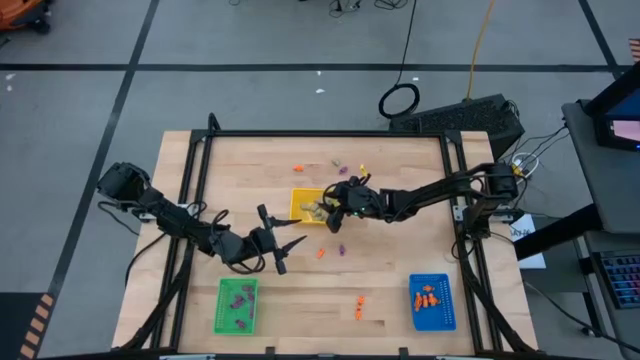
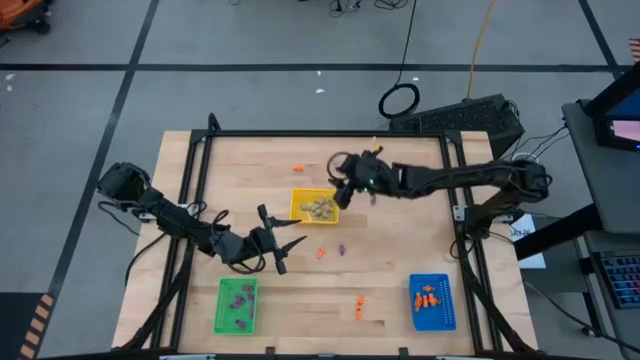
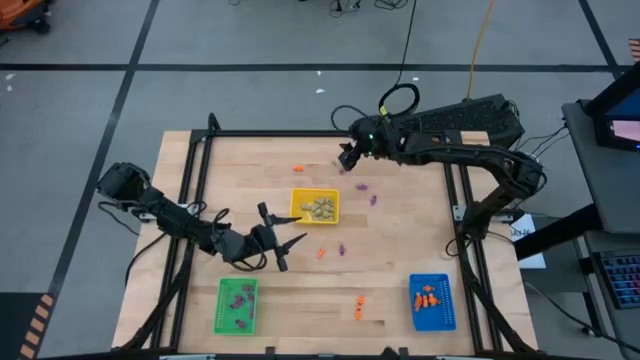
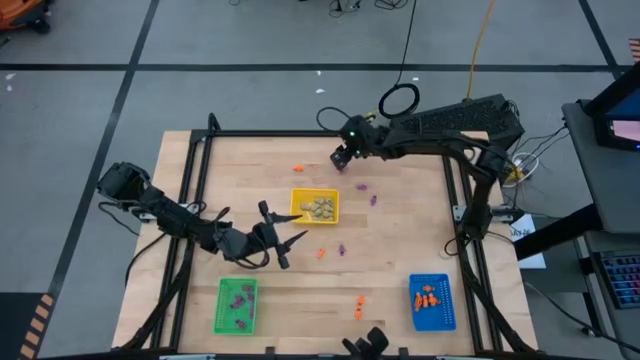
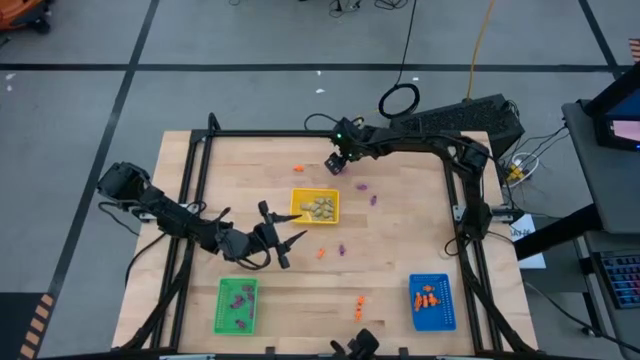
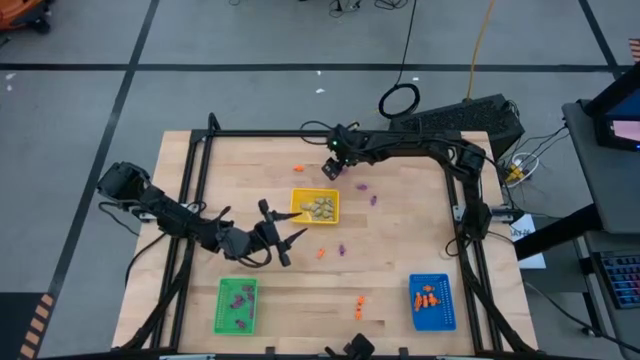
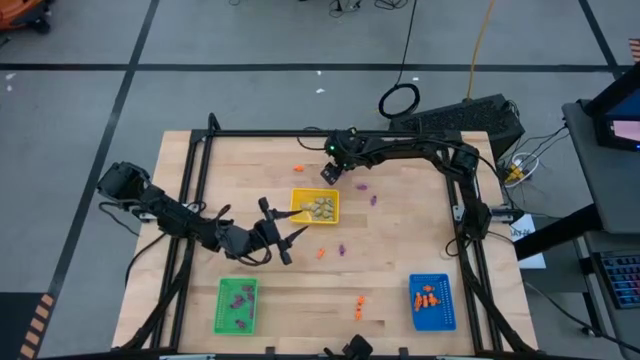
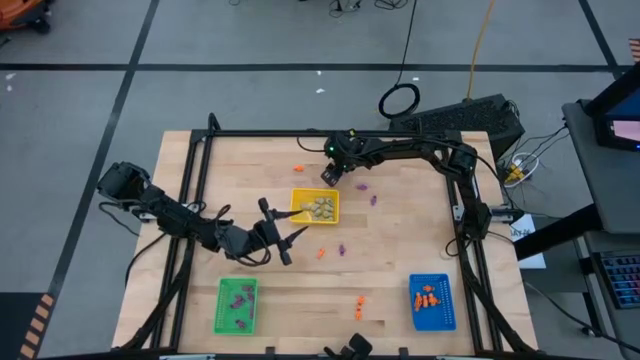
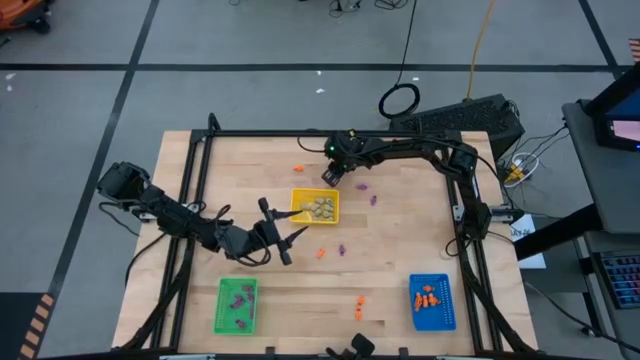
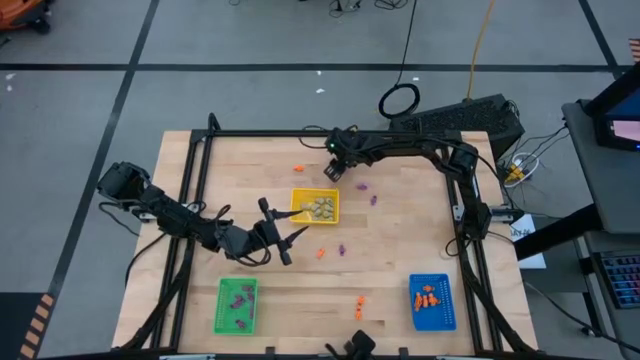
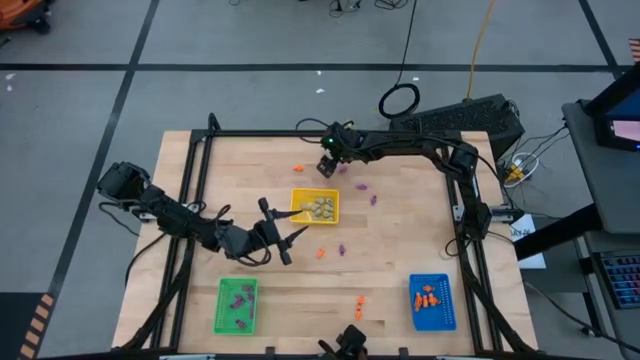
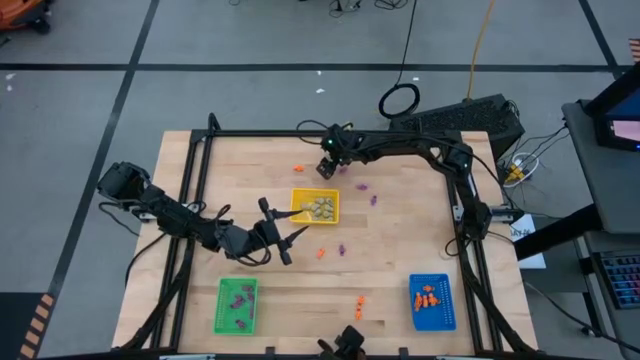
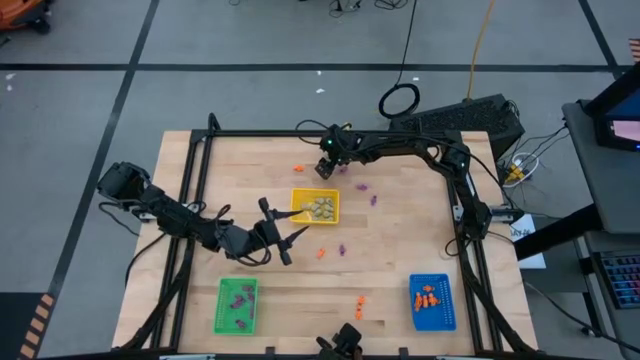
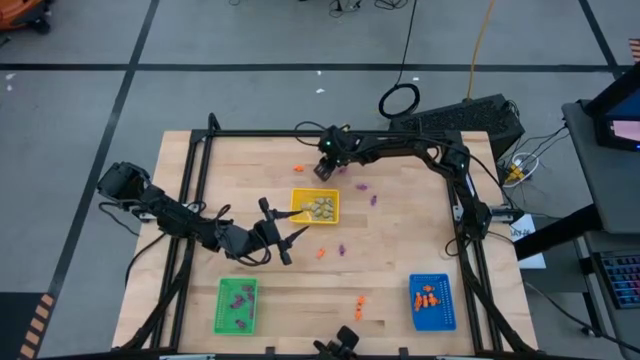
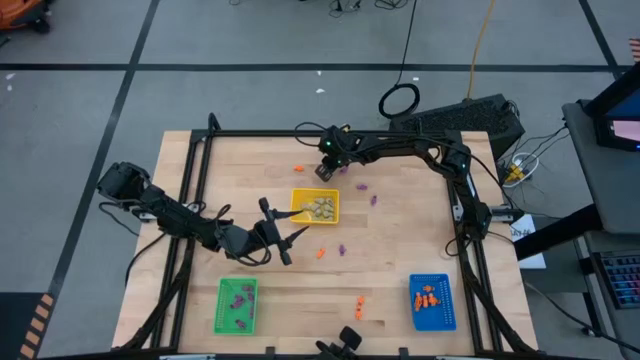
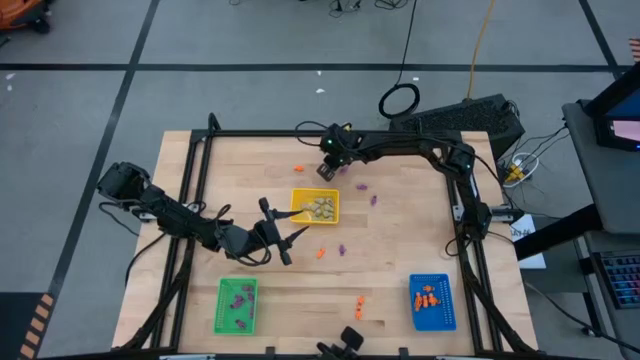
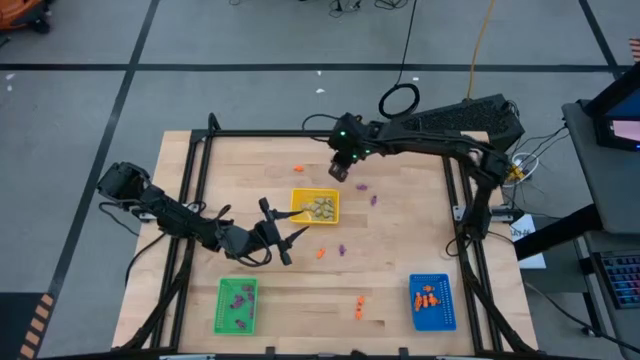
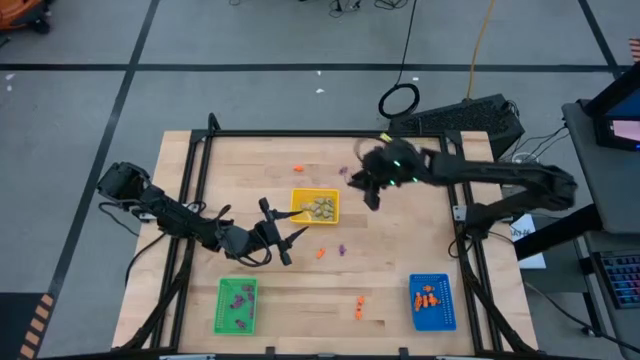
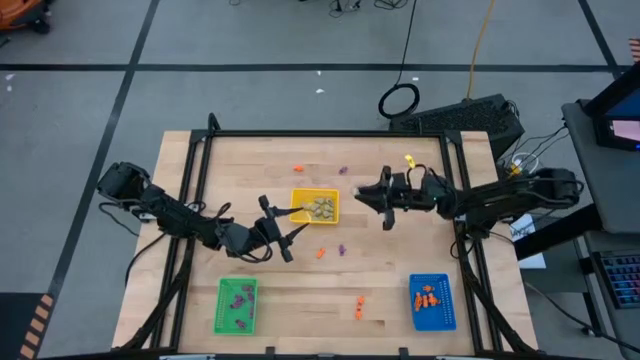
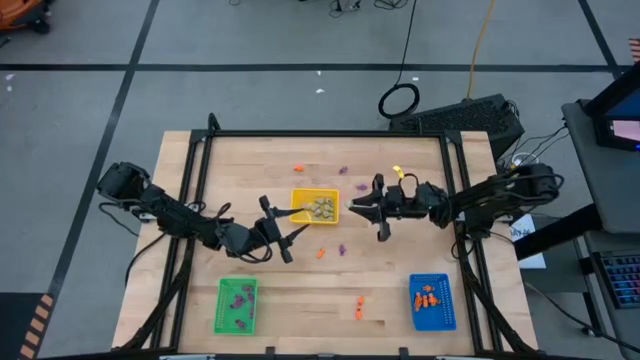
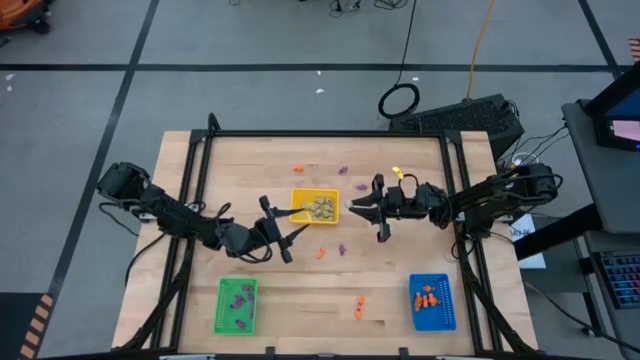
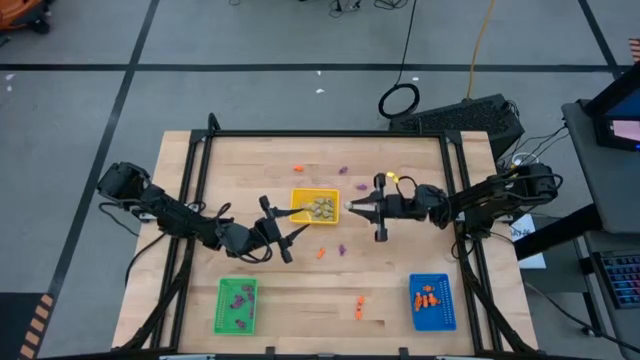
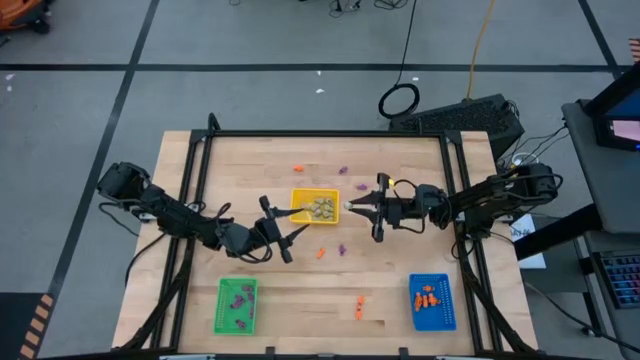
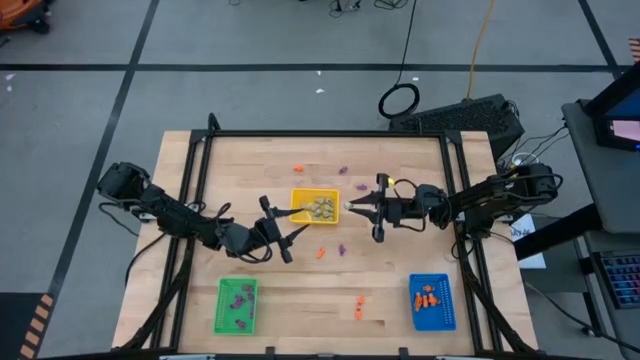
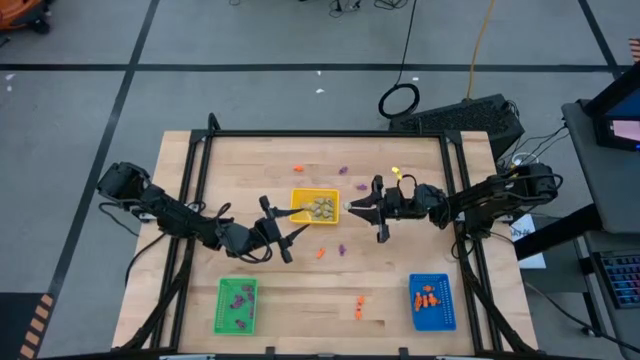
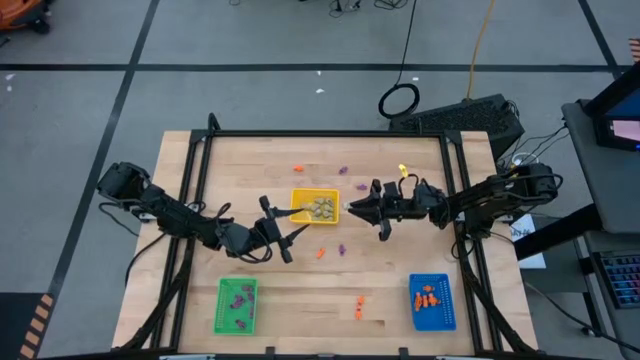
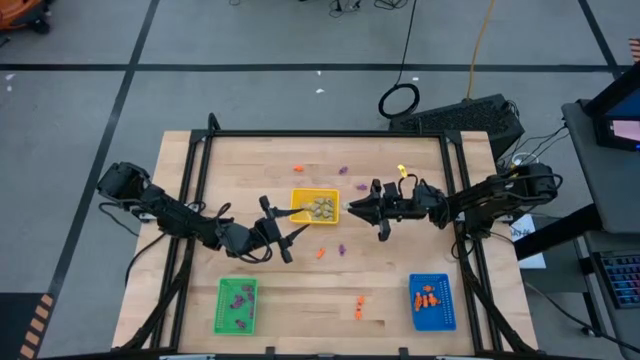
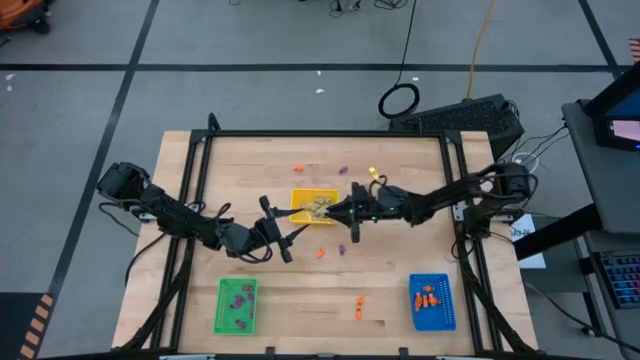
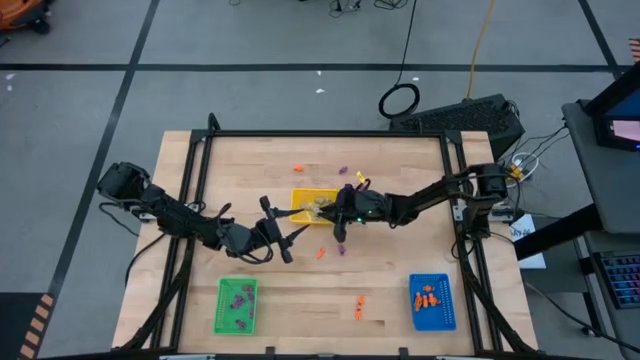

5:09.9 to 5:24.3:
Task: Sort Halloween decoration
Put the white skull toy in the yellow basket

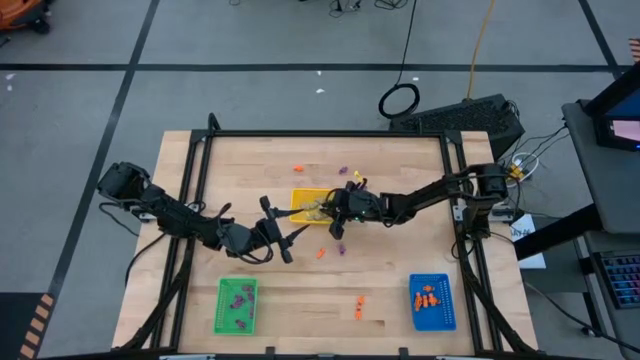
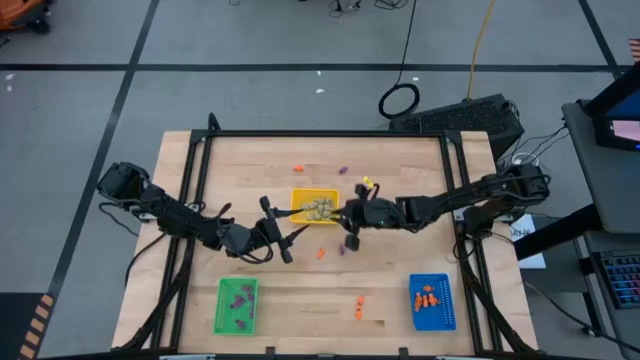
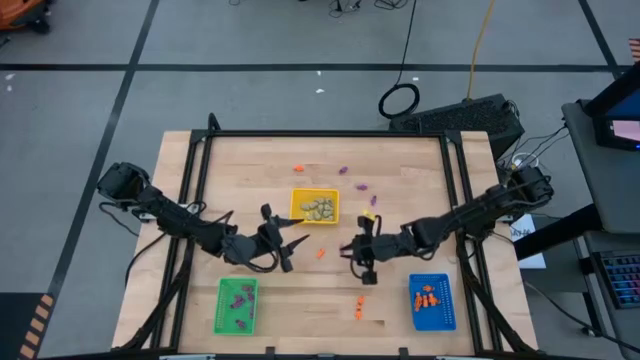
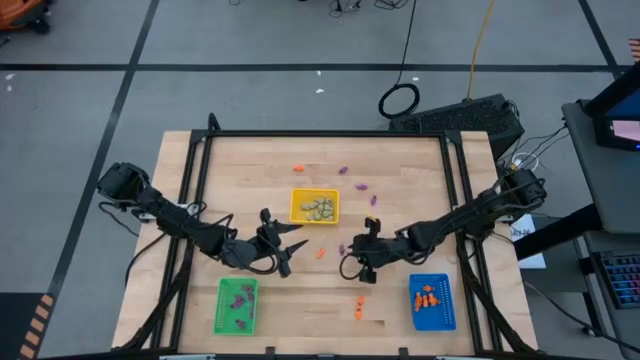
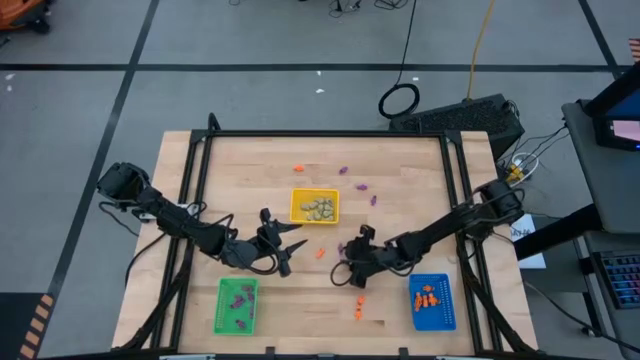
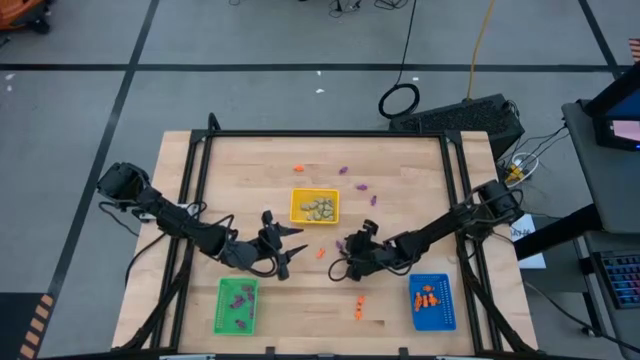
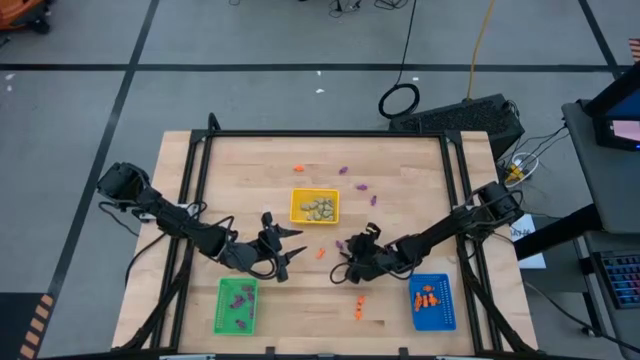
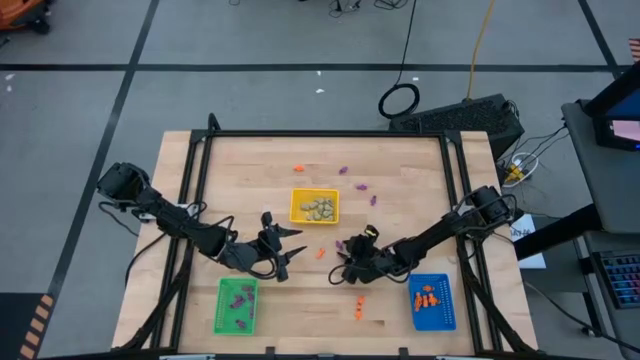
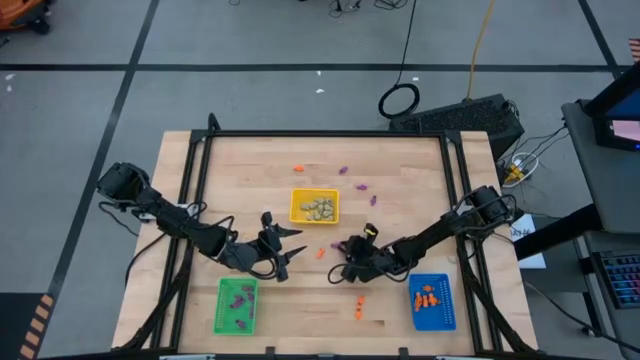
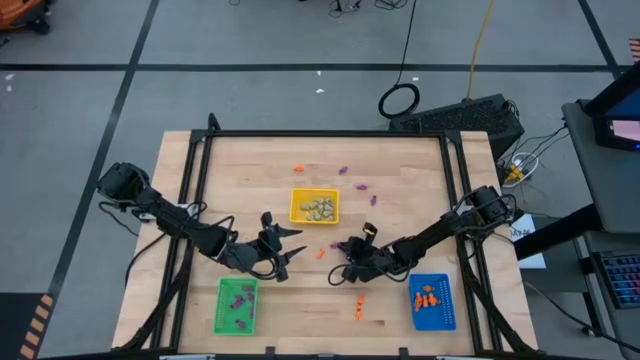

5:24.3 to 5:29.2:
Put the purple skeleton toy in the green basket

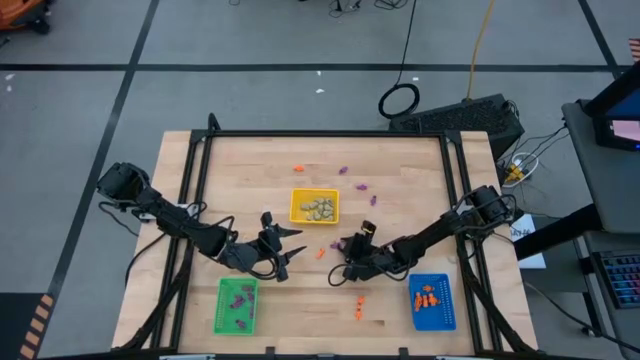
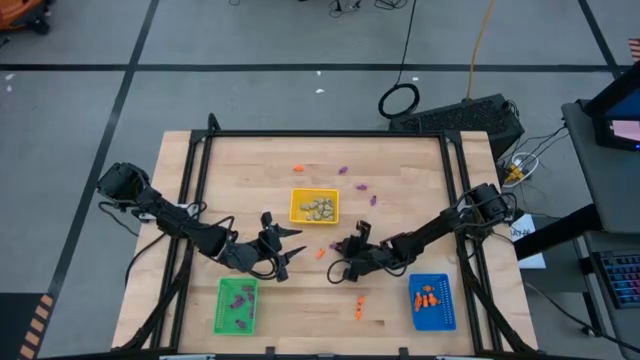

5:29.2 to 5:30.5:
Put the purple skeleton toy in the green basket
